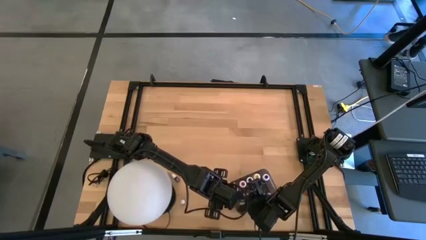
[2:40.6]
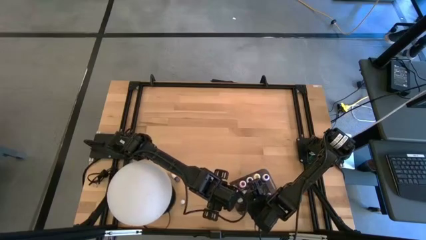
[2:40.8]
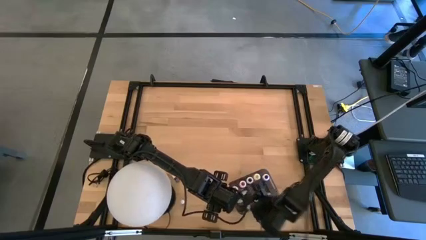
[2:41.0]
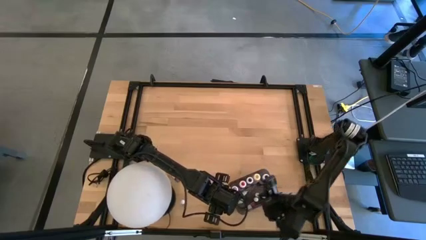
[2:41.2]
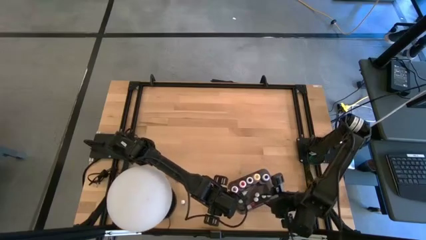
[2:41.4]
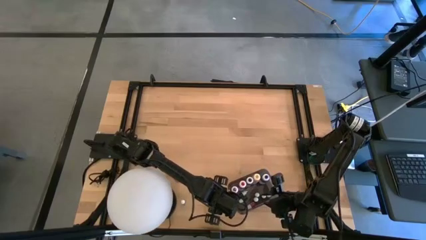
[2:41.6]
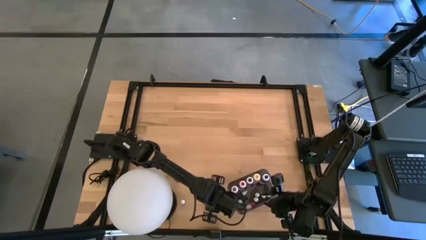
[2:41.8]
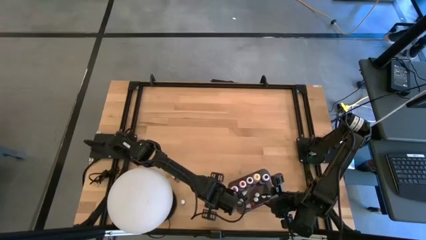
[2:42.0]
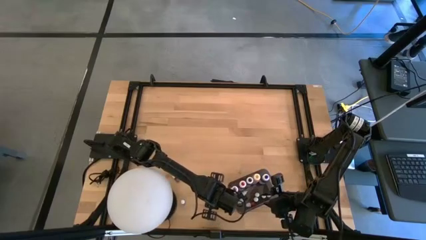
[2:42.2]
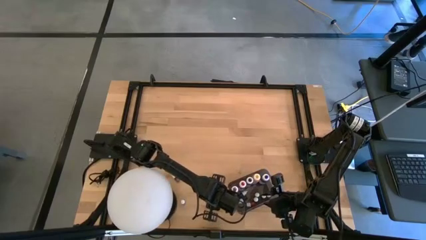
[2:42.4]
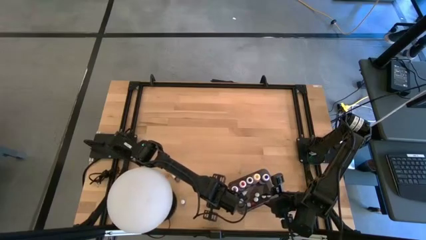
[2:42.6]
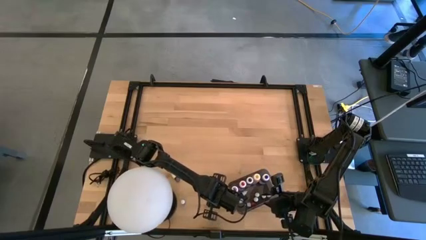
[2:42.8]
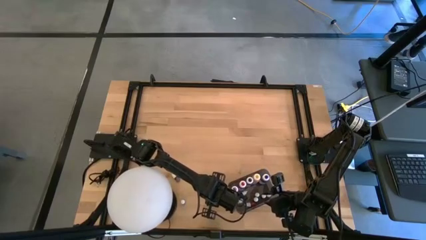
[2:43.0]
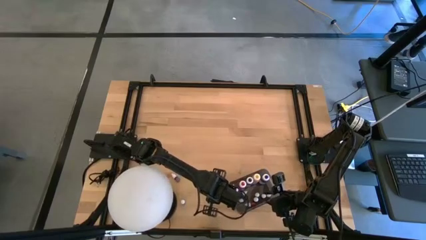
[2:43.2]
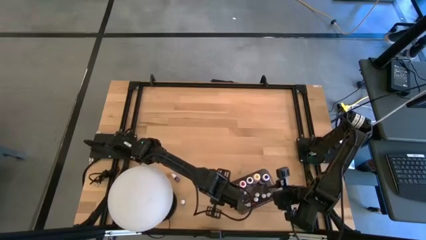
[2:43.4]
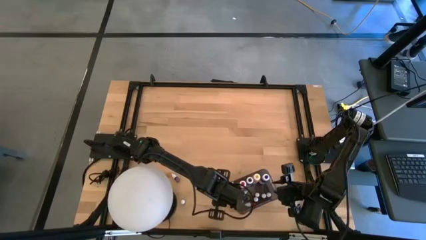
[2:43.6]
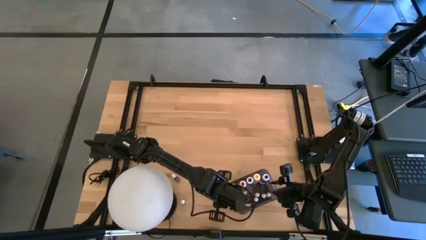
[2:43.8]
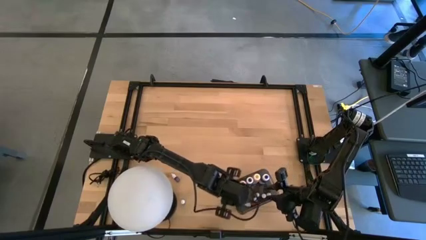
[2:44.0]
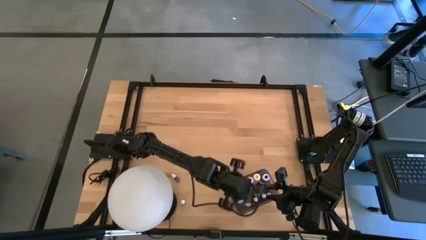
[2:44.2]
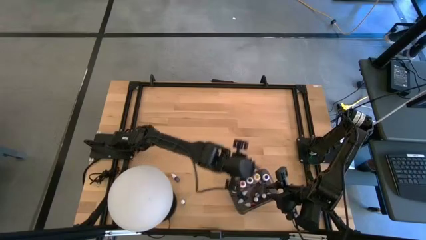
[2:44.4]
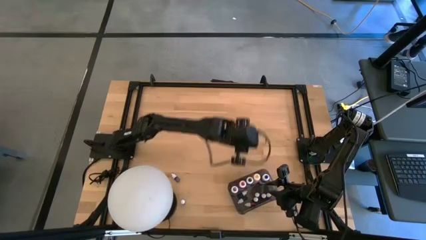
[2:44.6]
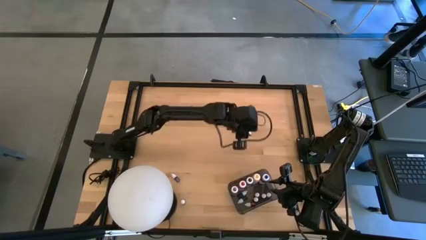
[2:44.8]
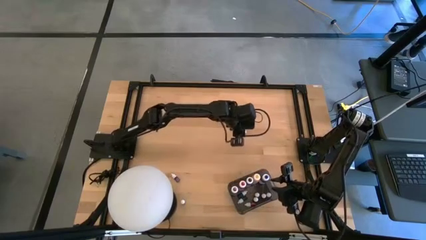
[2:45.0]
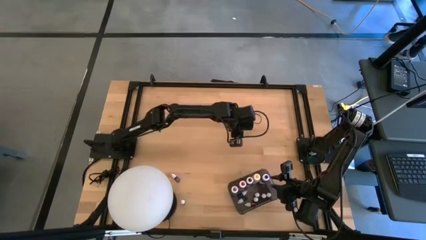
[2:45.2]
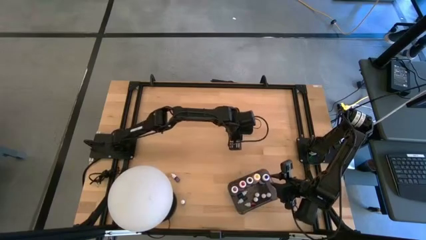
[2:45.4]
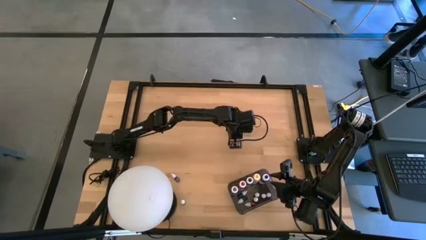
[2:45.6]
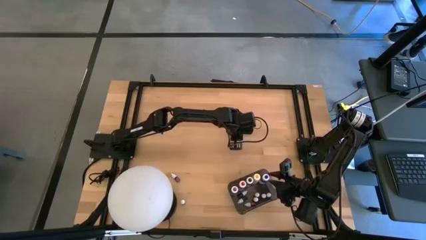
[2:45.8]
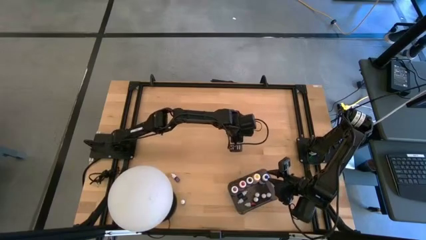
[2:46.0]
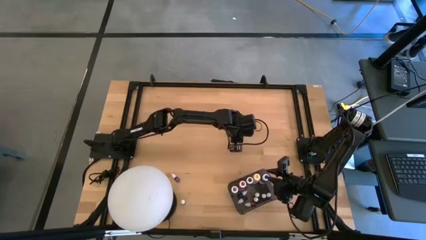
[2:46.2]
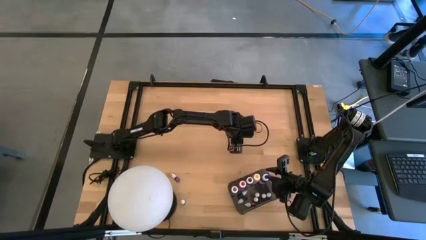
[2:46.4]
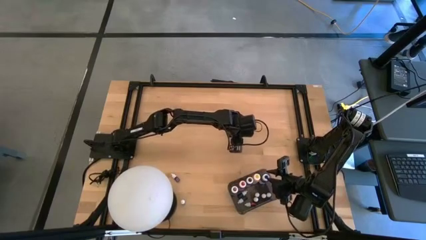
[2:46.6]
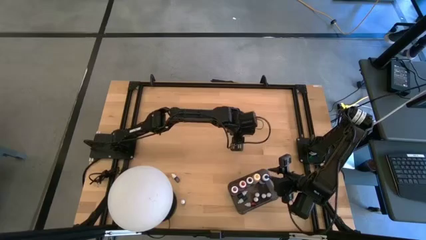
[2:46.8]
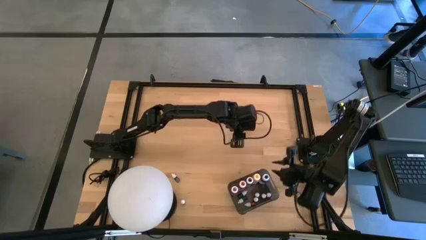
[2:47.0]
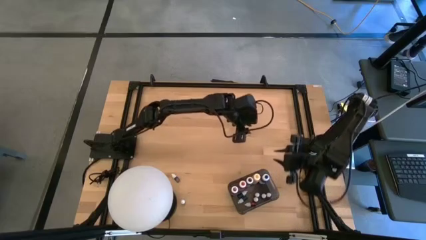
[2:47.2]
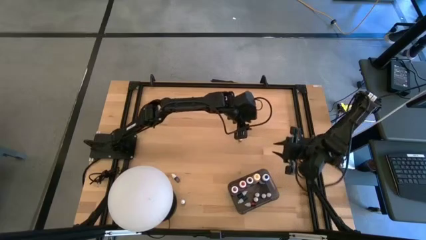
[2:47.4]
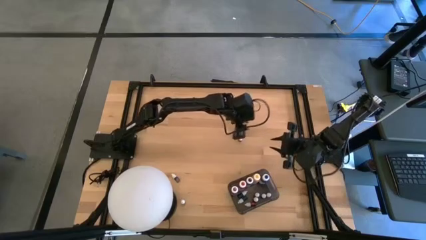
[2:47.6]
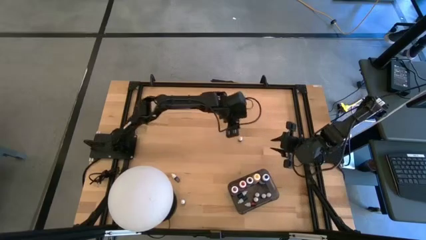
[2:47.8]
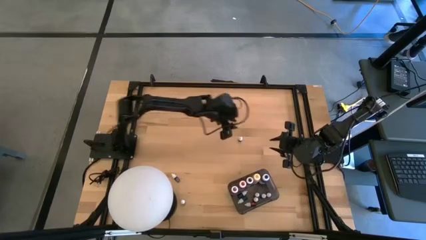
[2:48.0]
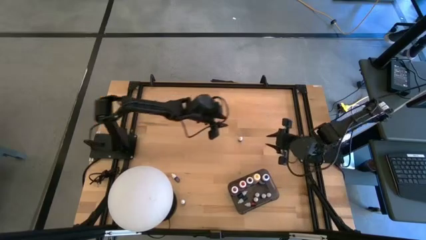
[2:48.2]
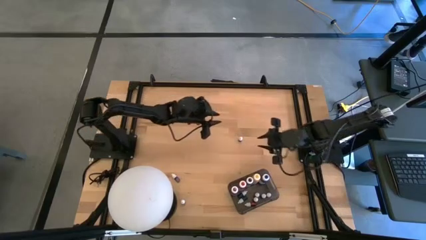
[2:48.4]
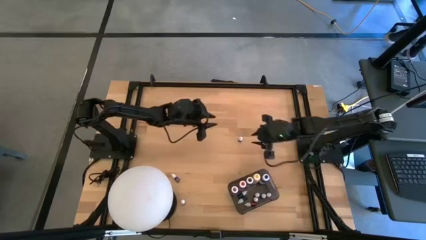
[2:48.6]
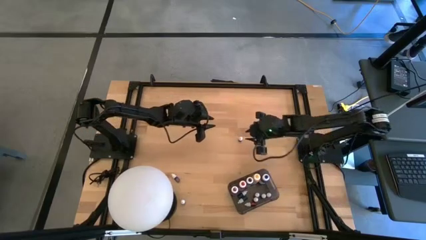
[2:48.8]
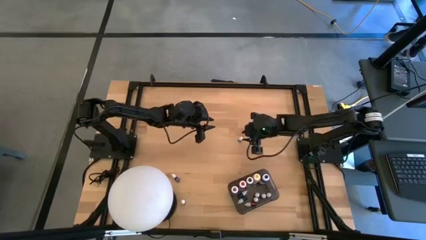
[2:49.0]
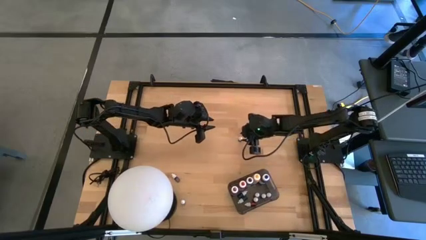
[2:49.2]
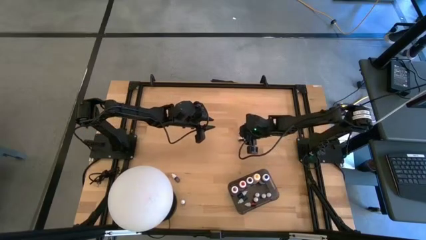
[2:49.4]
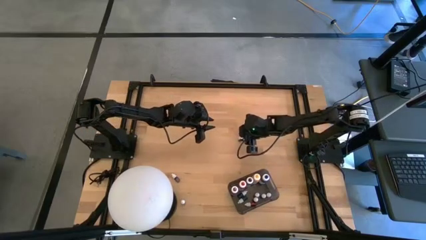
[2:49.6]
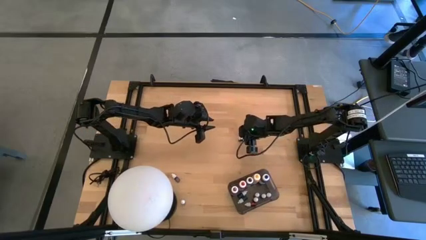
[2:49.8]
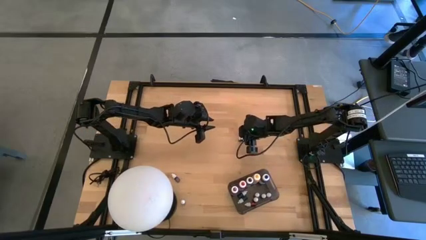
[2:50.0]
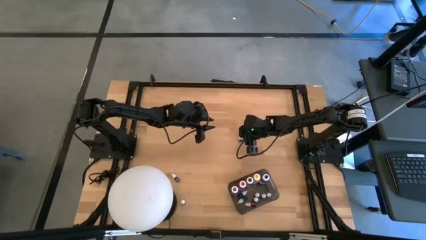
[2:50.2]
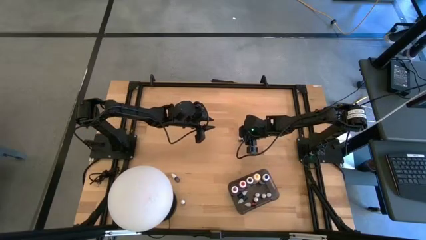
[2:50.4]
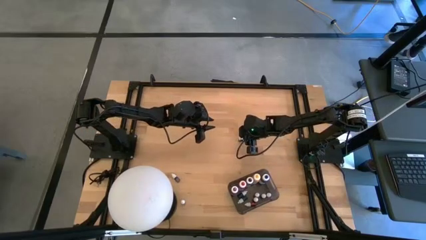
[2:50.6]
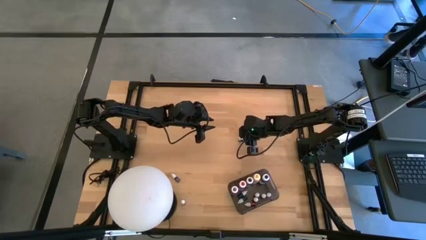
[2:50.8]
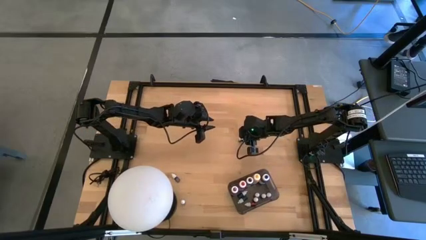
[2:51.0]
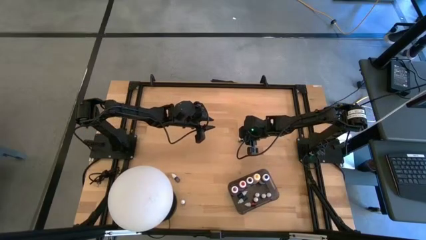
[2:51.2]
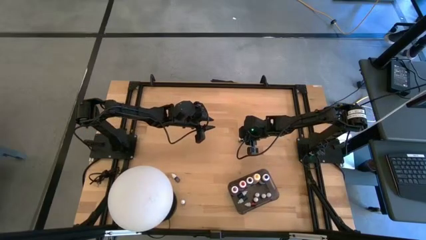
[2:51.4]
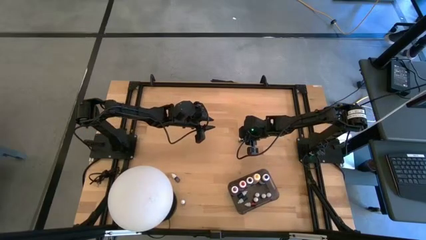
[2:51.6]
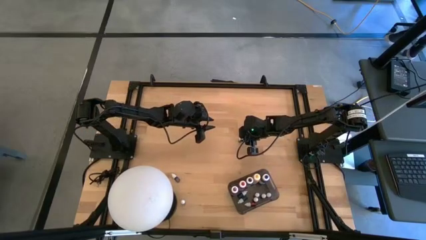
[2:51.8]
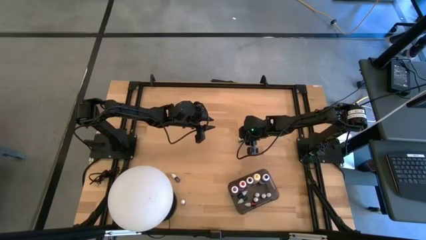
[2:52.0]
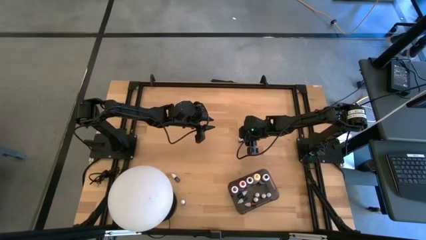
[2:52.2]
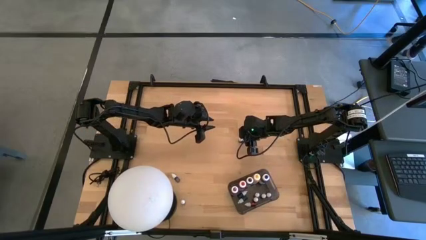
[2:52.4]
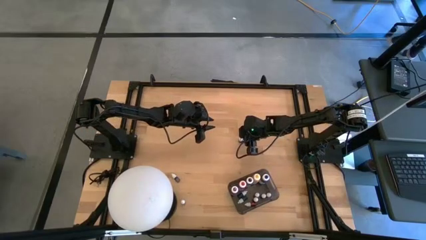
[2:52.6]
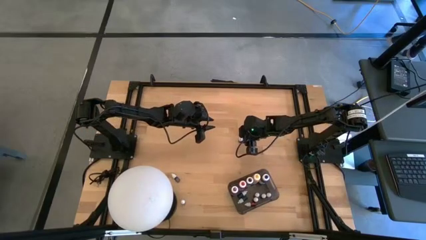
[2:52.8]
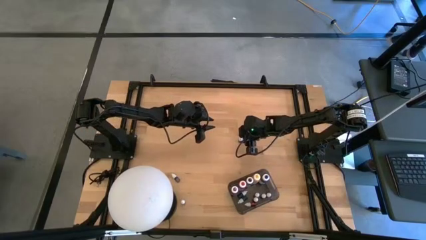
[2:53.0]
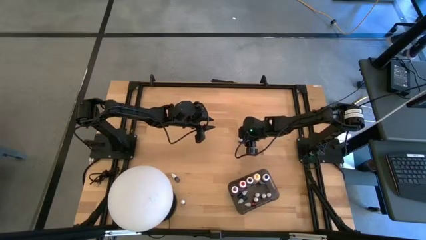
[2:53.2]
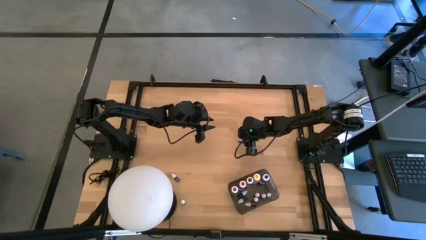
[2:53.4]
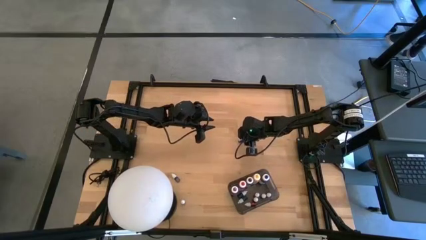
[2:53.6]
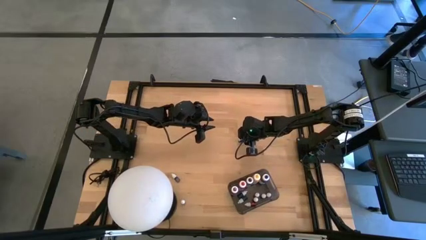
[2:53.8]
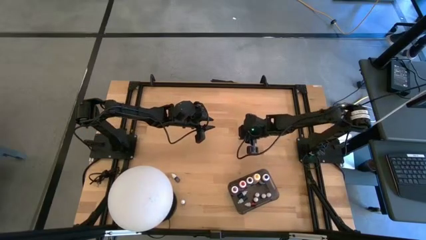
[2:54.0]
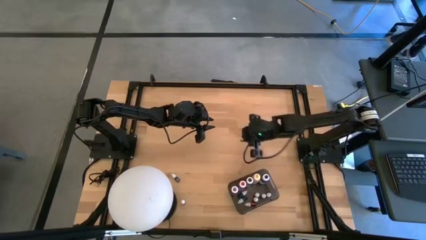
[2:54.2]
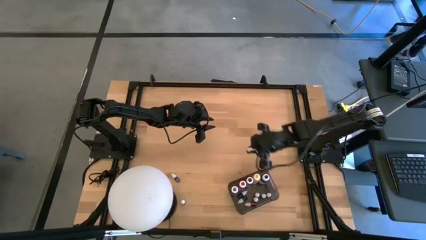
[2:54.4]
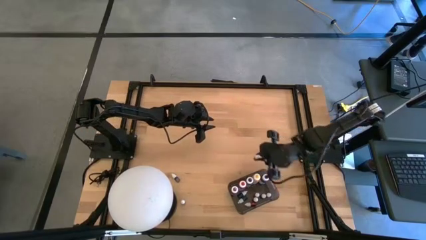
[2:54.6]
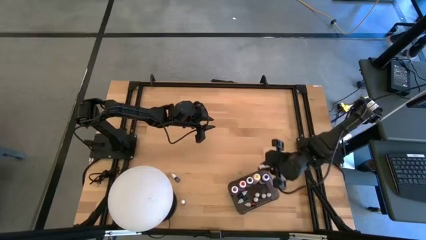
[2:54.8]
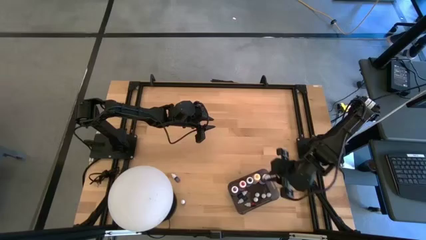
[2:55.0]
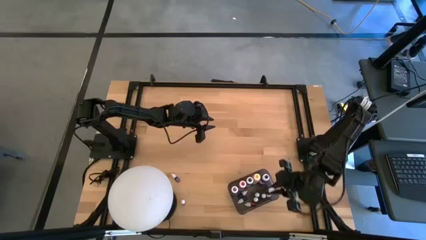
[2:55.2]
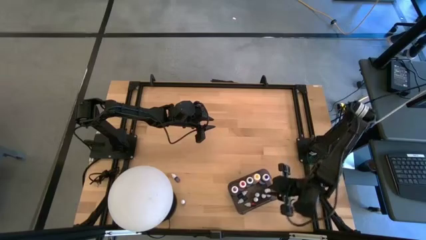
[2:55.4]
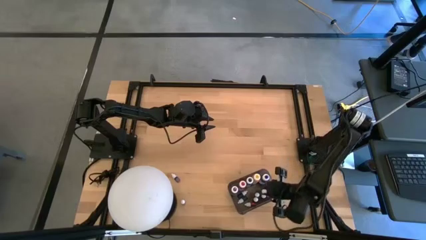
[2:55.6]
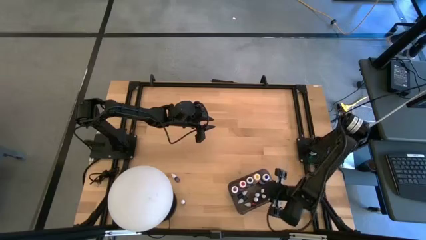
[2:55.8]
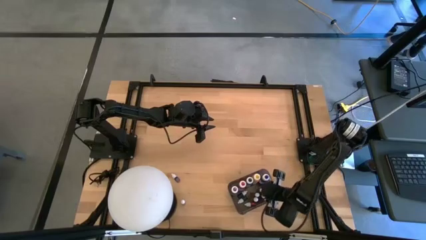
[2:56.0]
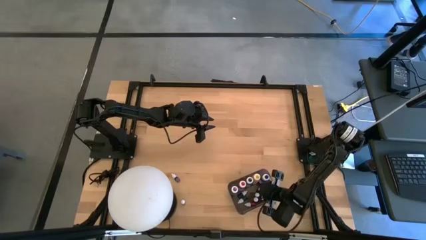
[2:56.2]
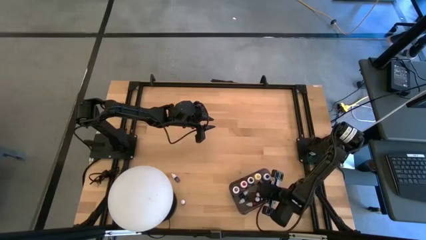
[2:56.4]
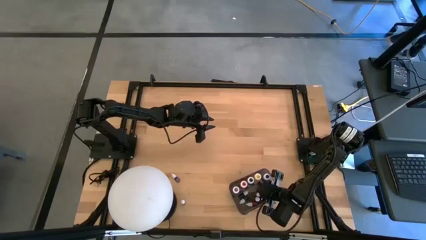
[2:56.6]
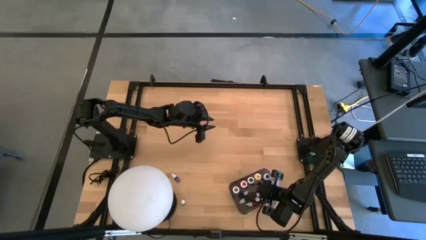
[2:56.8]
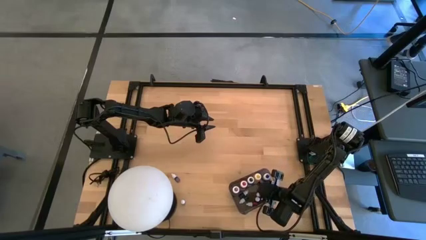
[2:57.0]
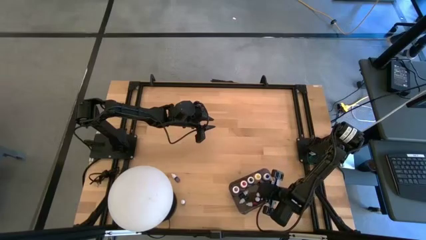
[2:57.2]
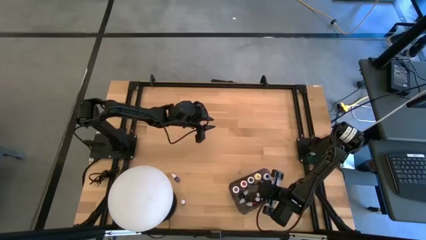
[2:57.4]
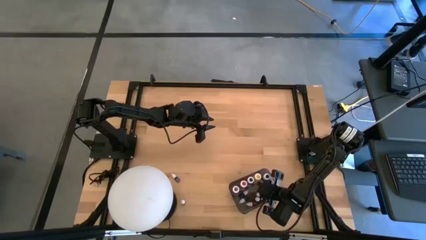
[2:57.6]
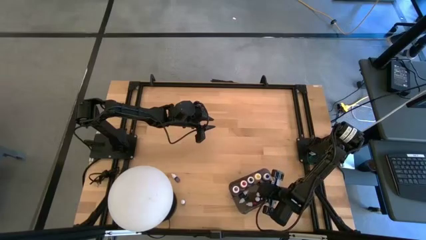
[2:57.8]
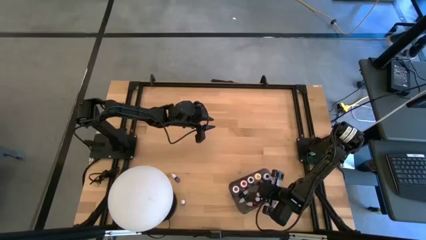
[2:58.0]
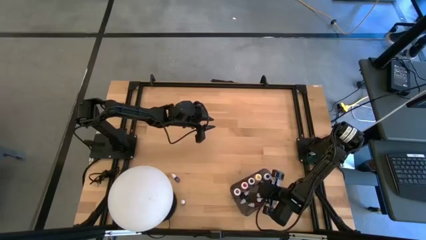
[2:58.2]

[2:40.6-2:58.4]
Task: Pick & Place food coloring
Put the small blue food coloring bottle into the bin
